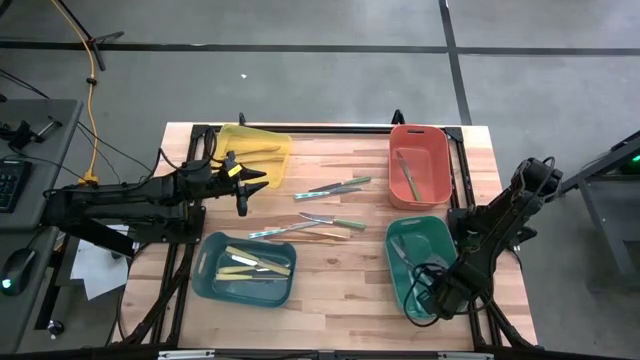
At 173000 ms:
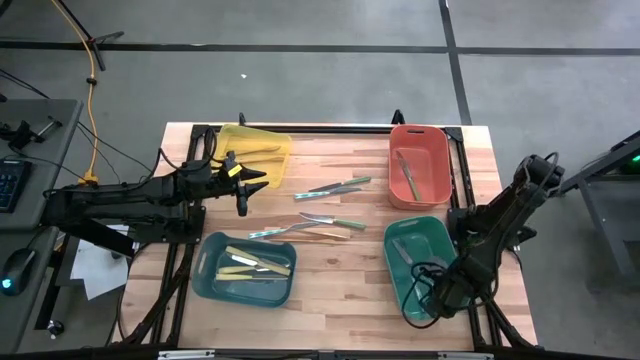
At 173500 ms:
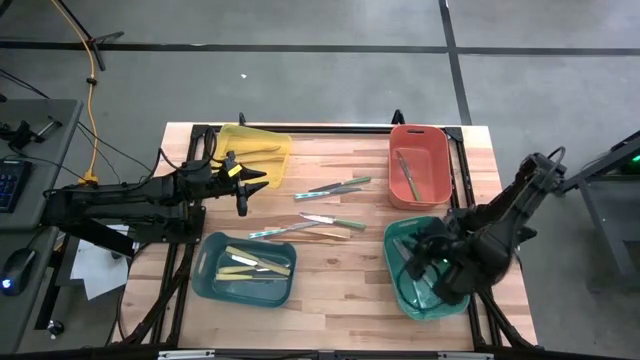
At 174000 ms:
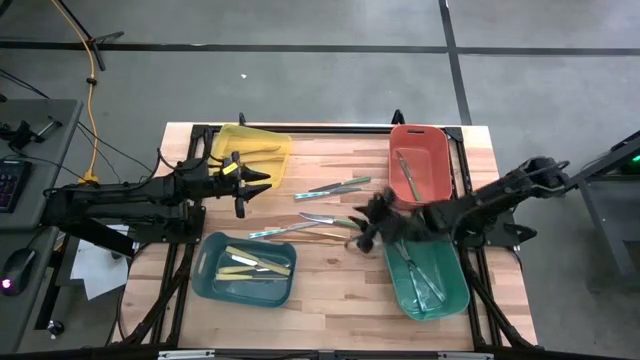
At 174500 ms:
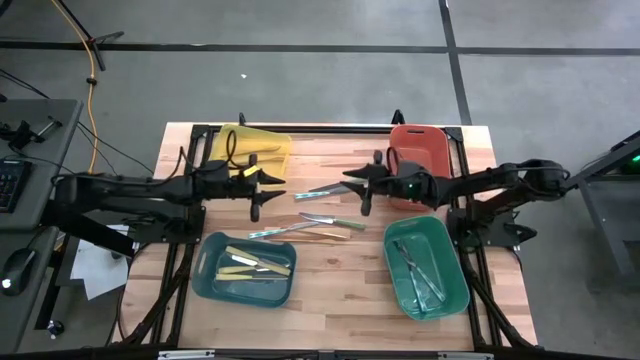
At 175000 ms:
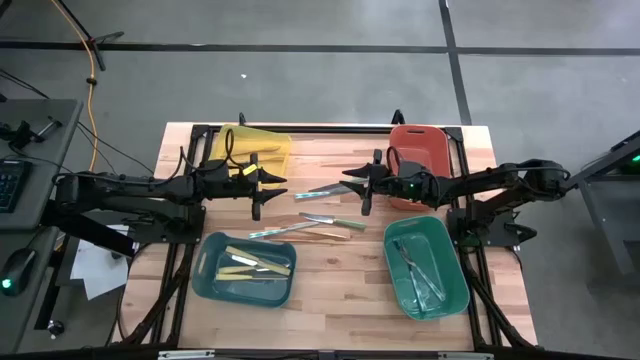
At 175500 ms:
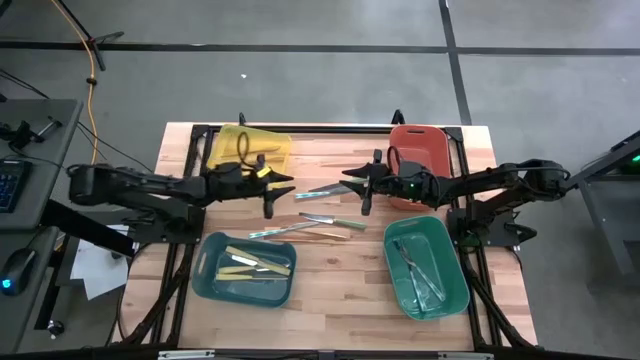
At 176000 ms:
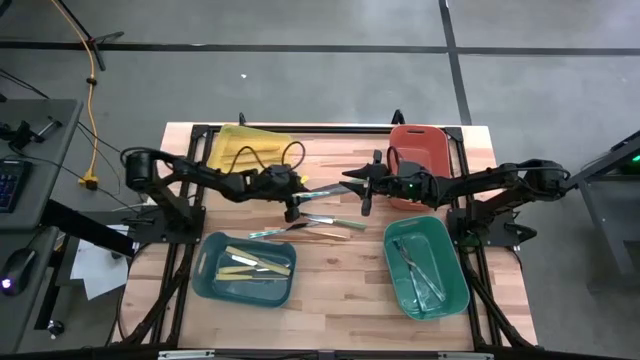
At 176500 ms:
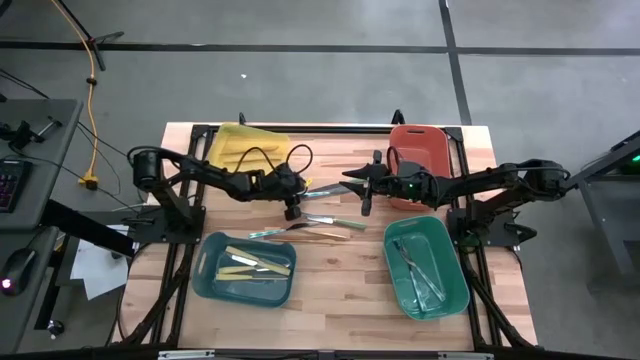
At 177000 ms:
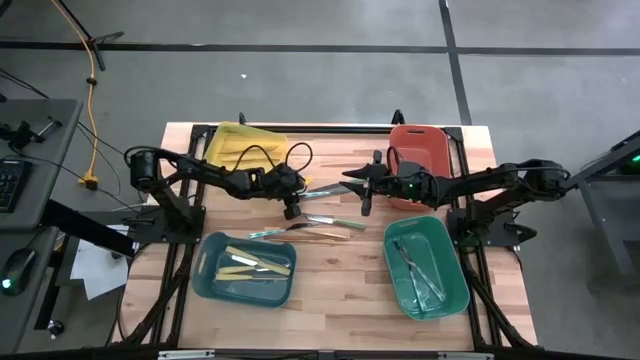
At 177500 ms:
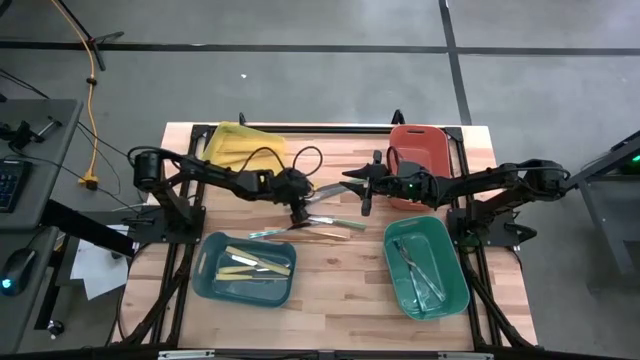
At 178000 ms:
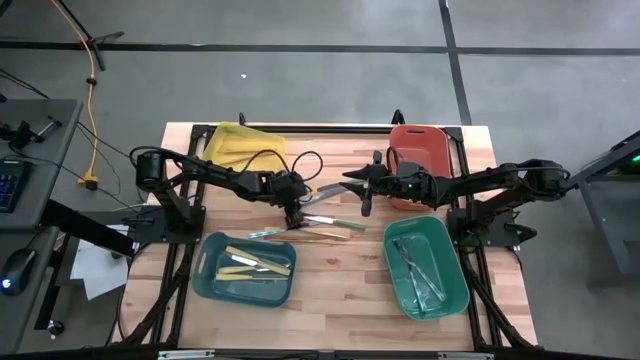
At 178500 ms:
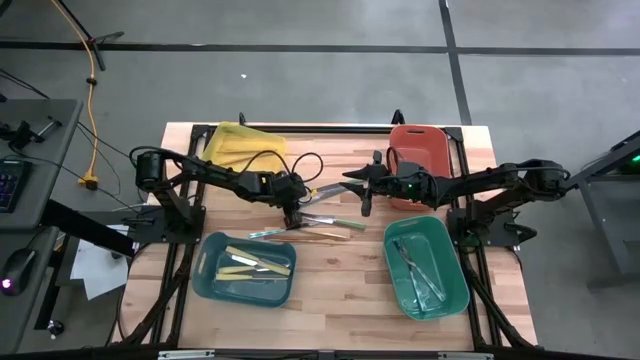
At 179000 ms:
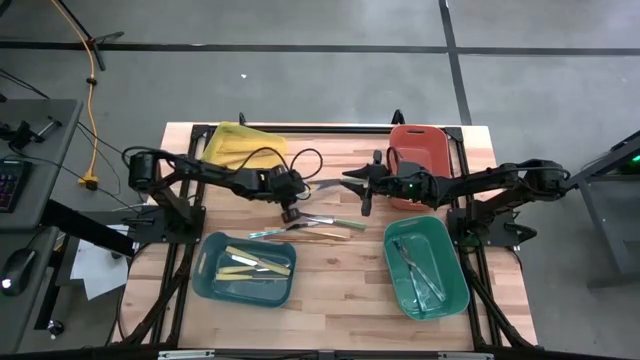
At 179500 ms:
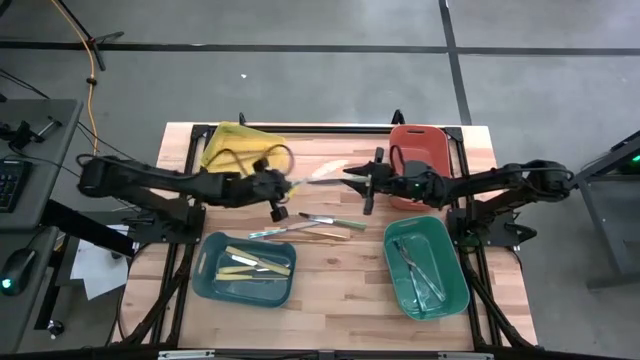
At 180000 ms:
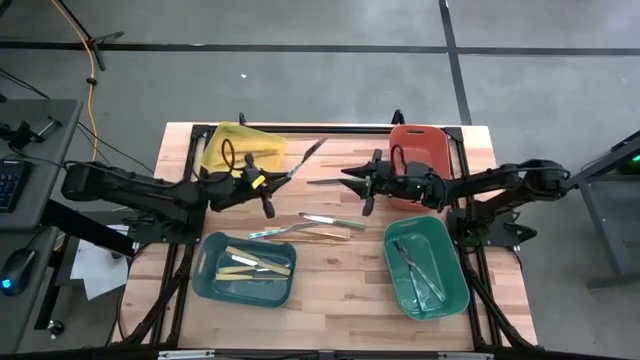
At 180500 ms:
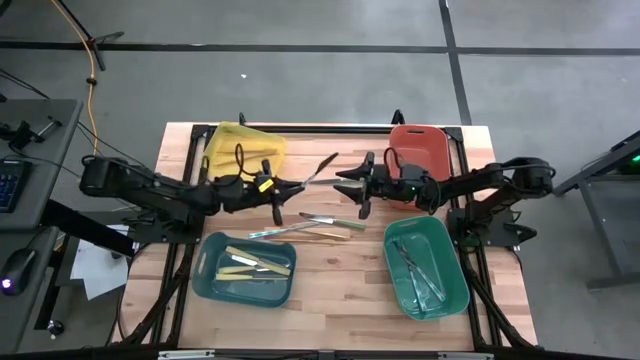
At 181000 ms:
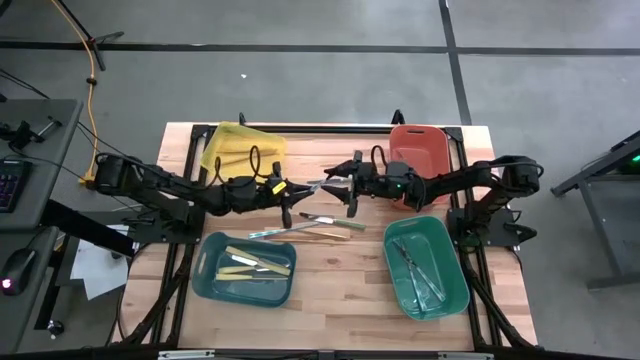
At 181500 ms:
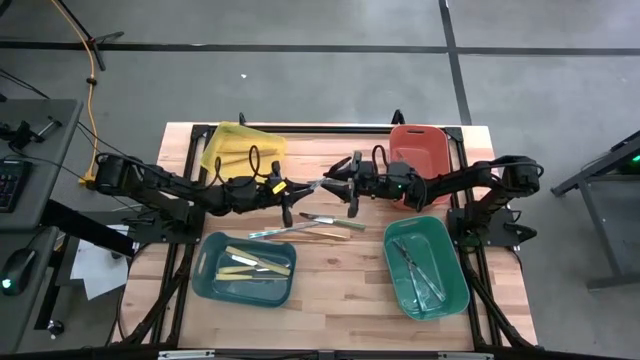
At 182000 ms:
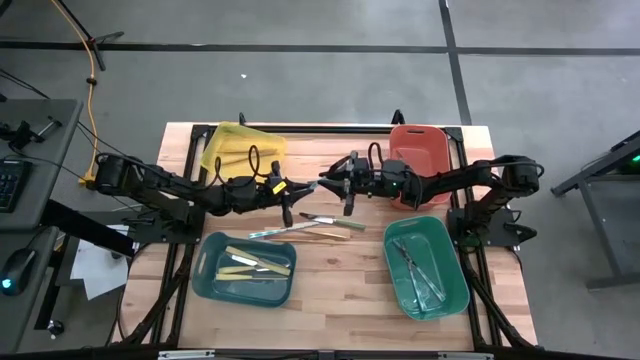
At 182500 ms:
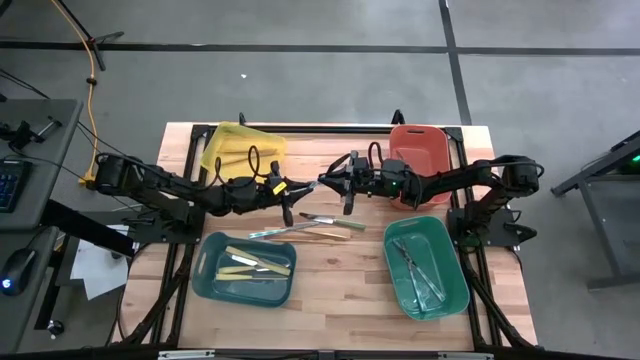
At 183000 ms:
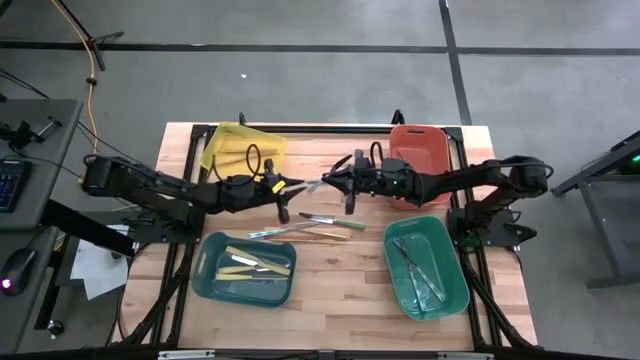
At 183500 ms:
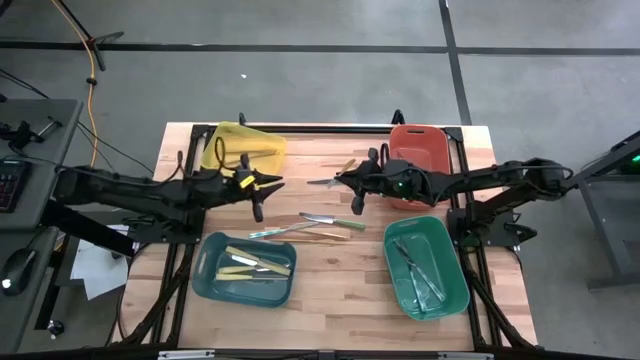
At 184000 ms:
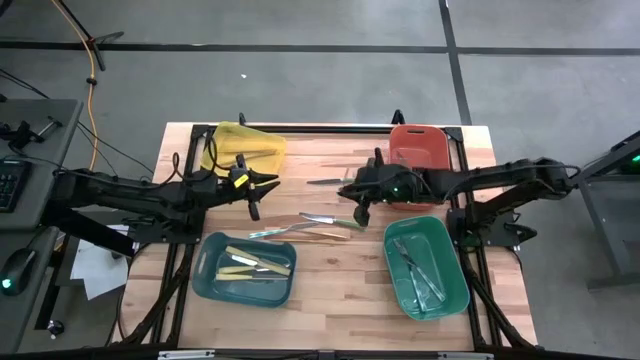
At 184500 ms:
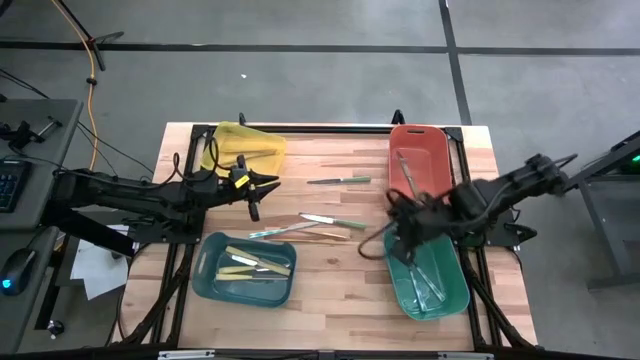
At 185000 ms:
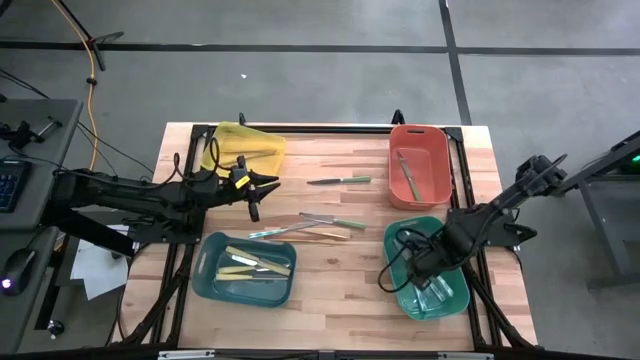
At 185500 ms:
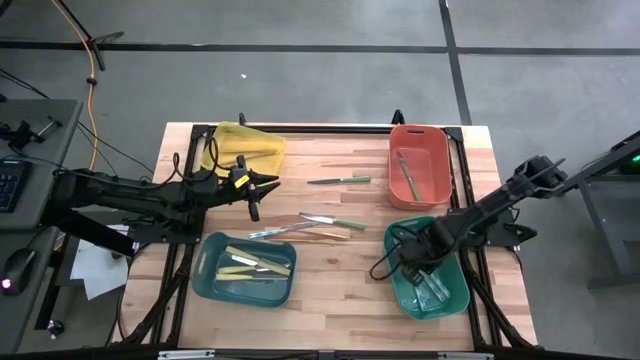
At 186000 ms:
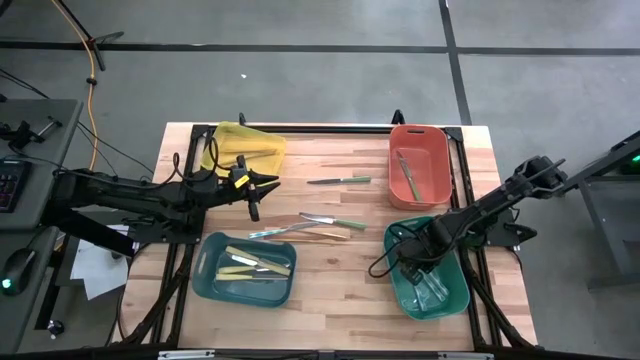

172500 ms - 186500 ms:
Task: Sort silverware by color (type)
Put the patterned green knife into the green bin

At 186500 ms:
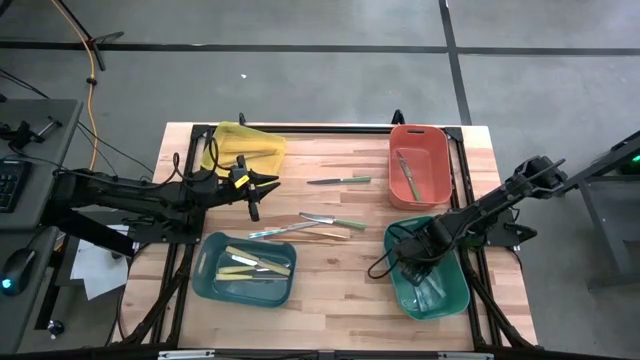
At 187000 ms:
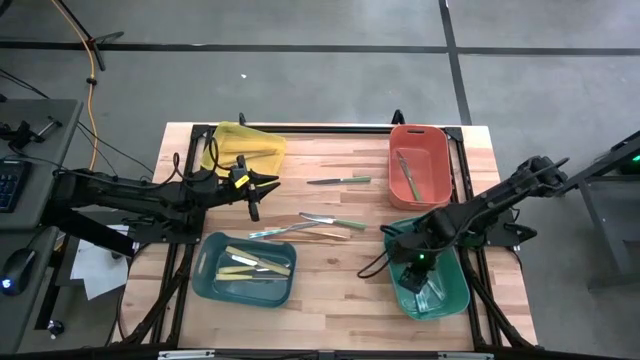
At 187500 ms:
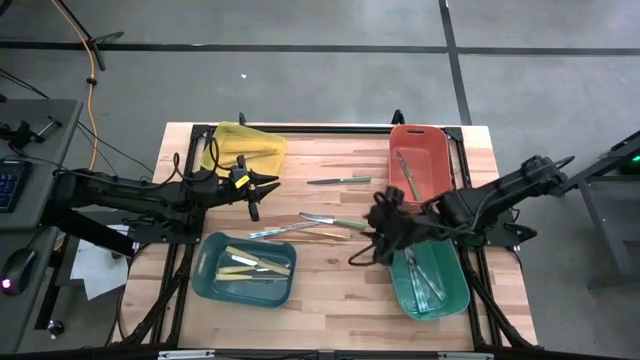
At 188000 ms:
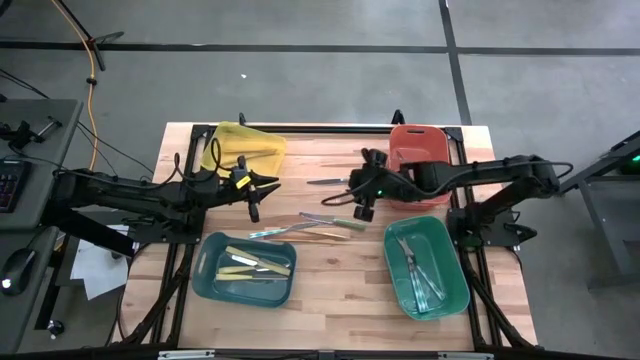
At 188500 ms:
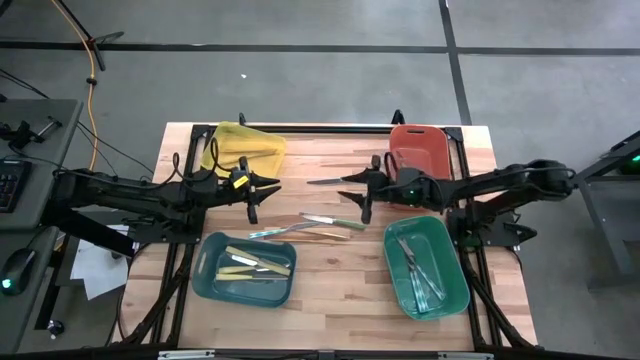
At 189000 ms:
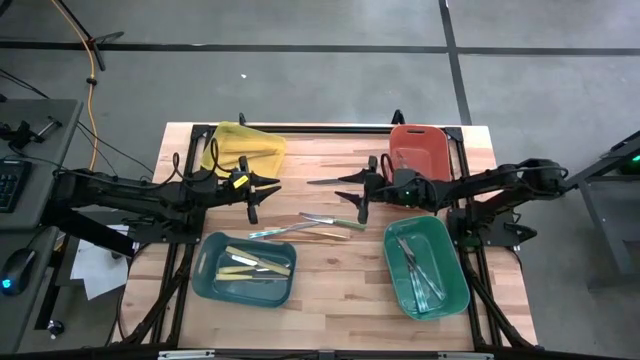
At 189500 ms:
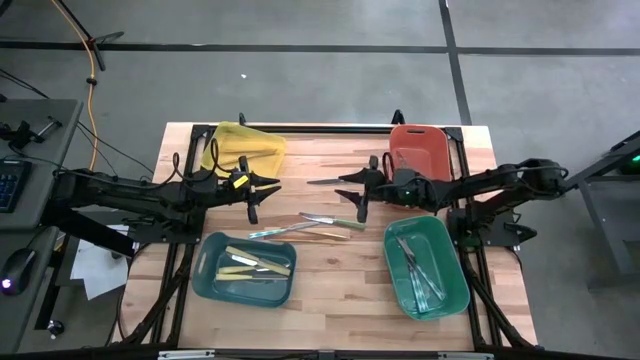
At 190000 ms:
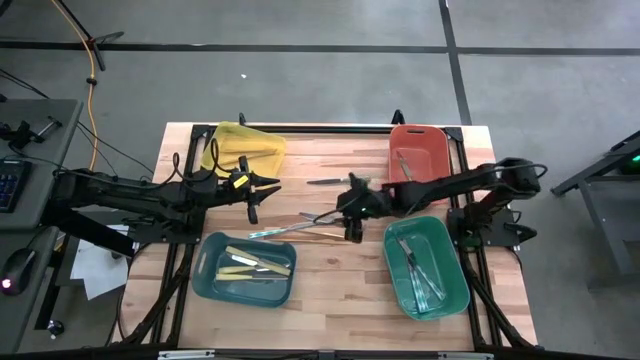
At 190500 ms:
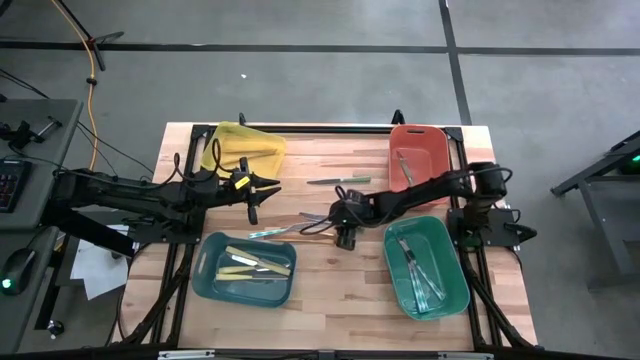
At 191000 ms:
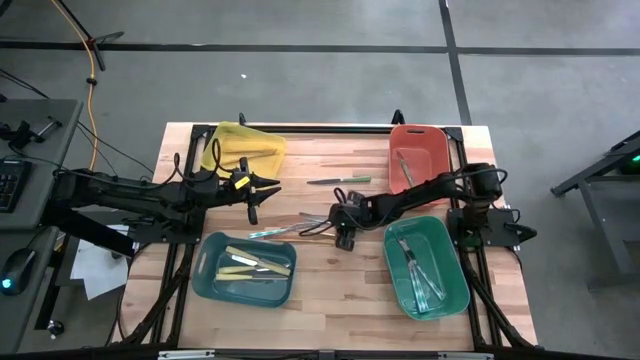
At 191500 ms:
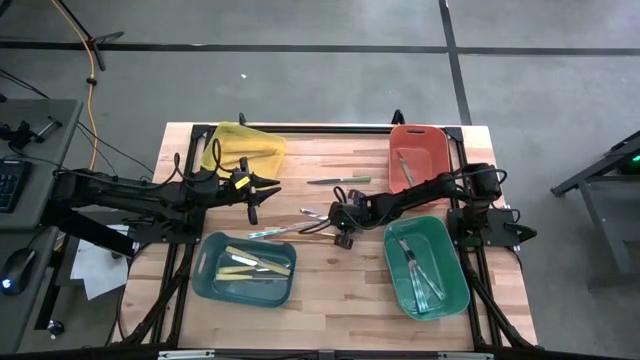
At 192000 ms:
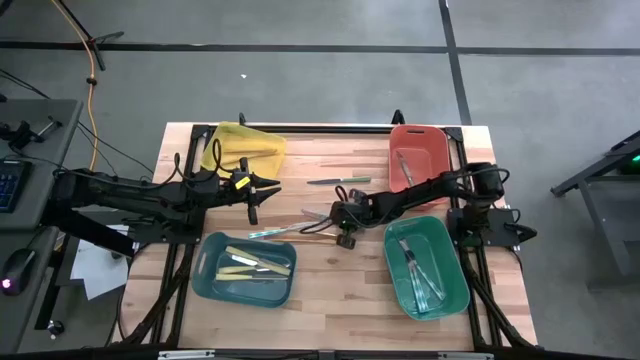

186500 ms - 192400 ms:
Put the green knife into the orange bin

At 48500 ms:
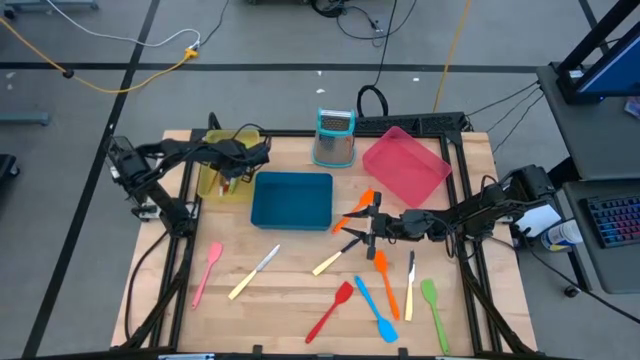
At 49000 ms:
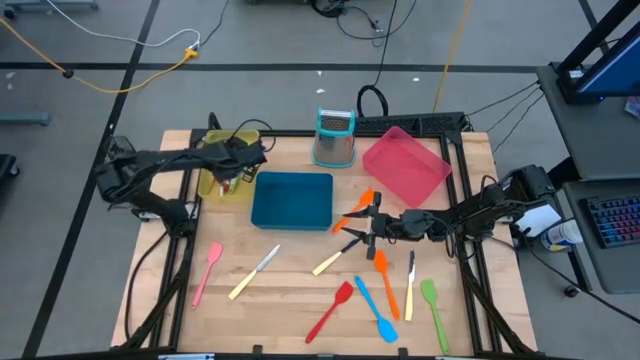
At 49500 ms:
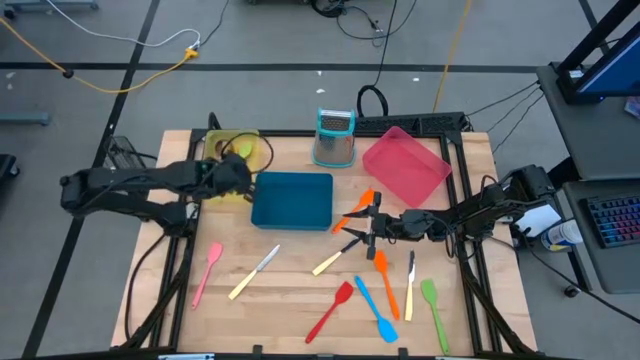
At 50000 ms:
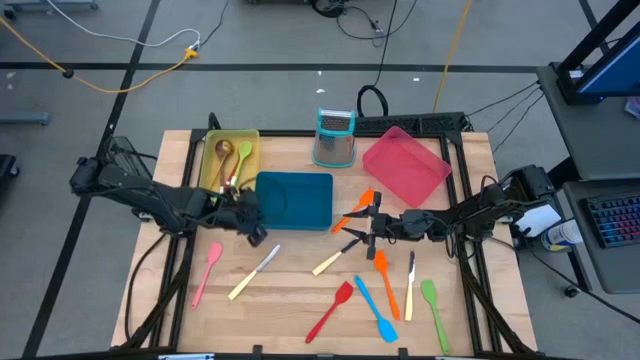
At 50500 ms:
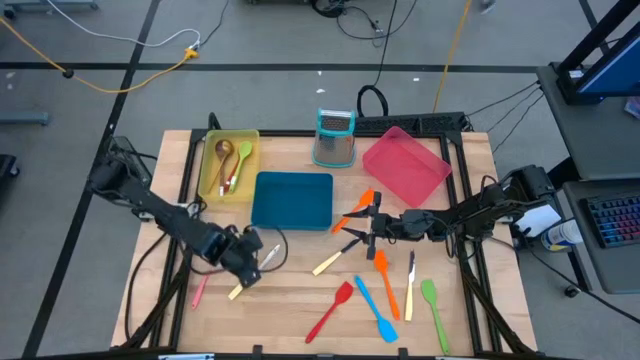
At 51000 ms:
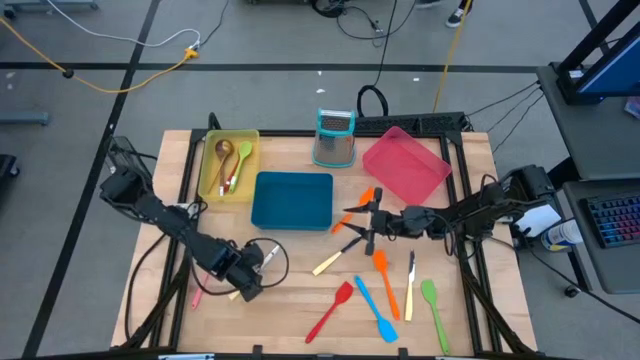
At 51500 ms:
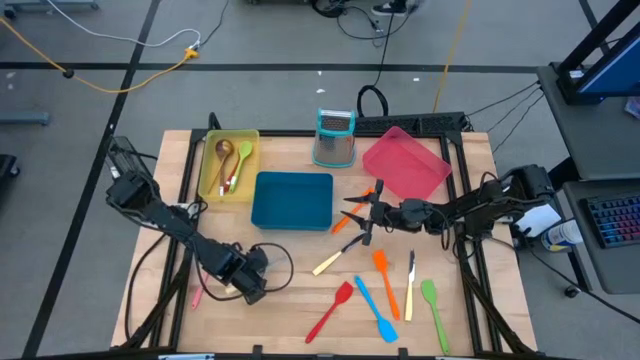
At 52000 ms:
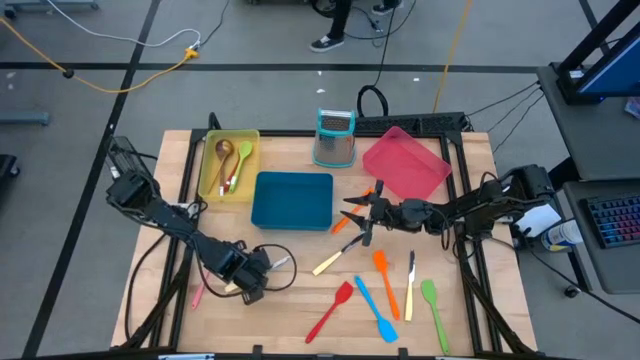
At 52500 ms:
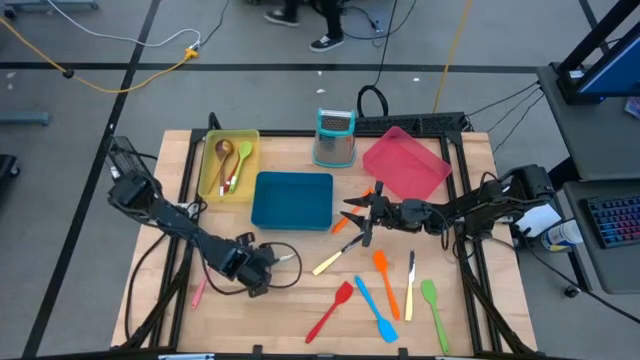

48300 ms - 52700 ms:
Task: Pick & Place Kitchen Items
Put the bottom left yellow table knife into the blue bin
